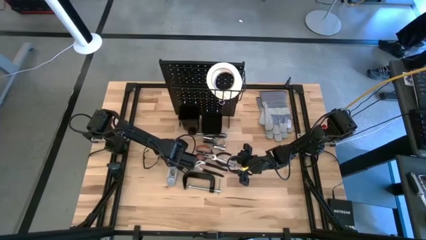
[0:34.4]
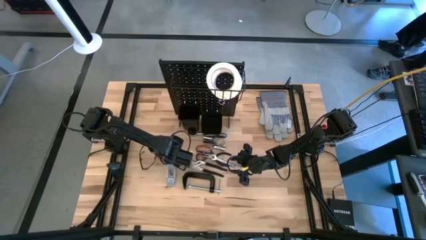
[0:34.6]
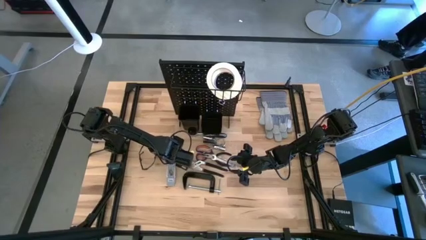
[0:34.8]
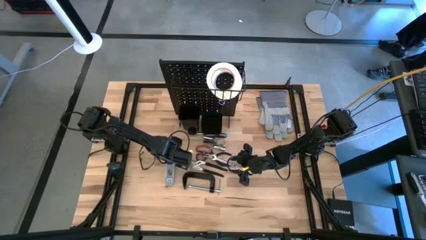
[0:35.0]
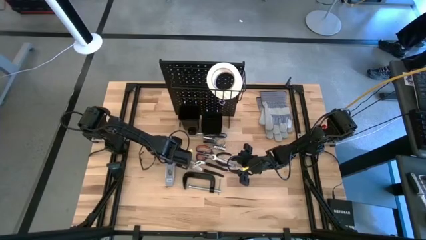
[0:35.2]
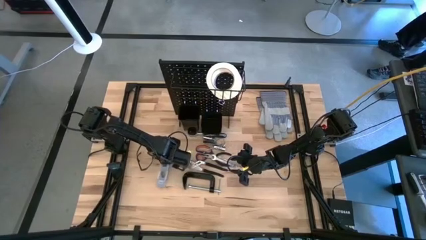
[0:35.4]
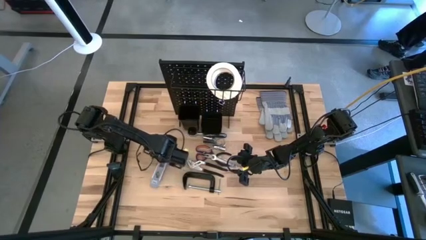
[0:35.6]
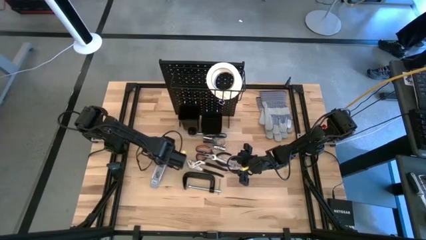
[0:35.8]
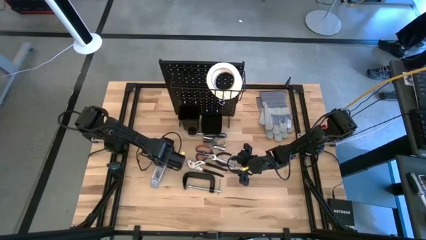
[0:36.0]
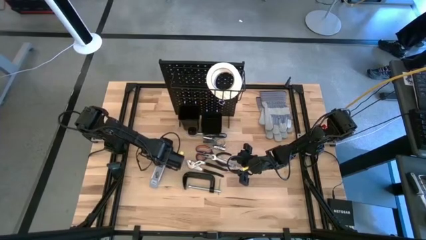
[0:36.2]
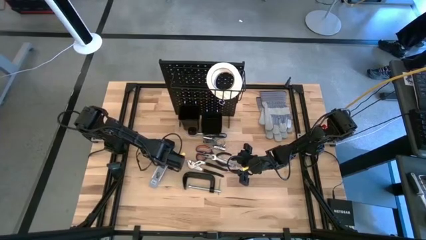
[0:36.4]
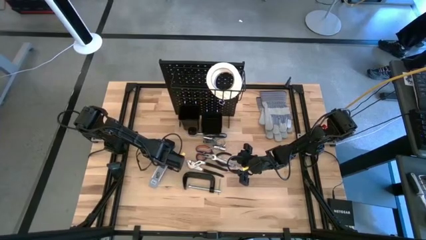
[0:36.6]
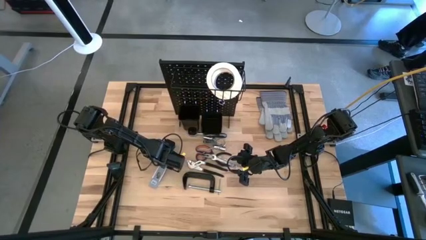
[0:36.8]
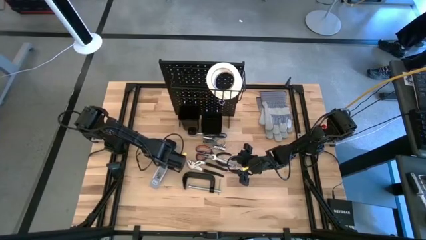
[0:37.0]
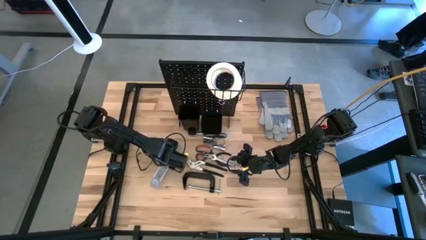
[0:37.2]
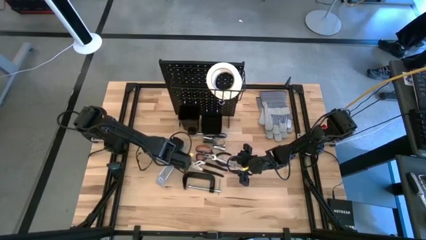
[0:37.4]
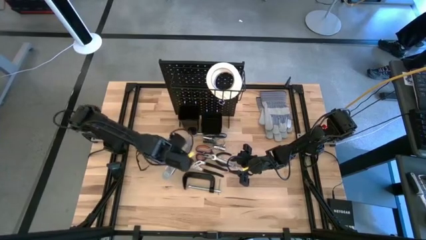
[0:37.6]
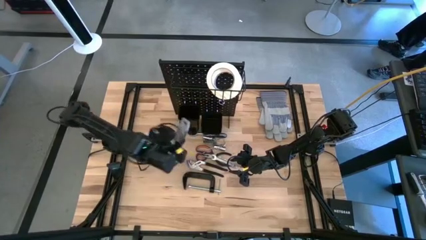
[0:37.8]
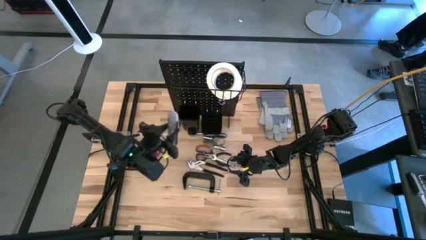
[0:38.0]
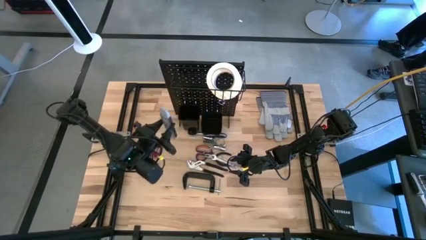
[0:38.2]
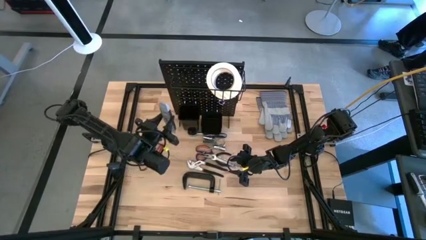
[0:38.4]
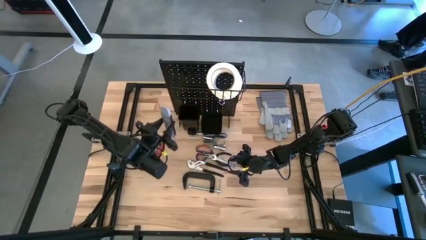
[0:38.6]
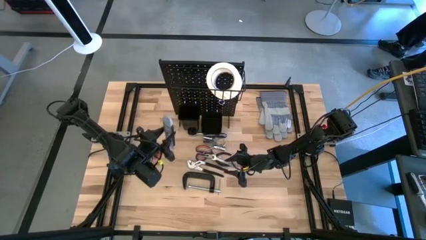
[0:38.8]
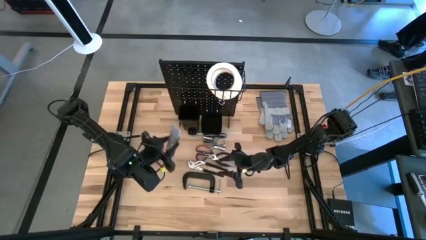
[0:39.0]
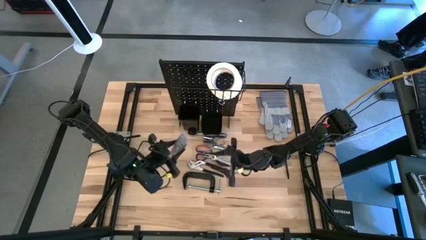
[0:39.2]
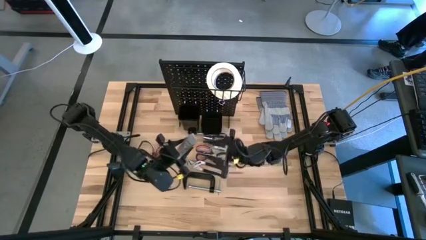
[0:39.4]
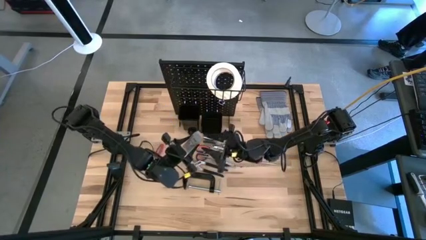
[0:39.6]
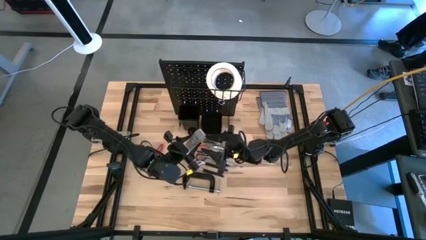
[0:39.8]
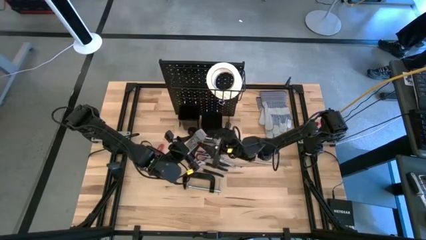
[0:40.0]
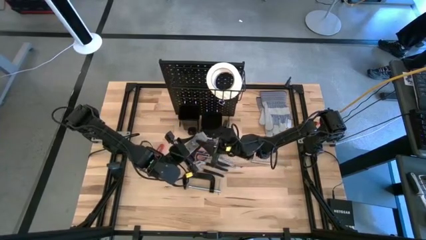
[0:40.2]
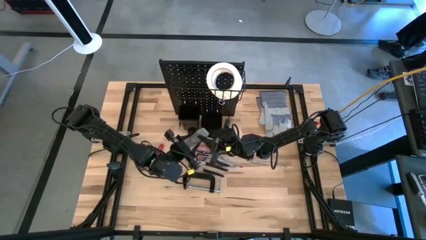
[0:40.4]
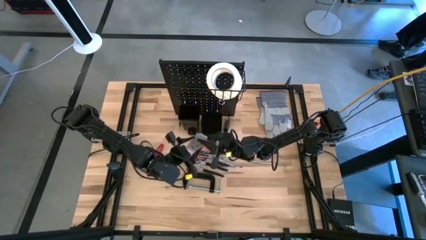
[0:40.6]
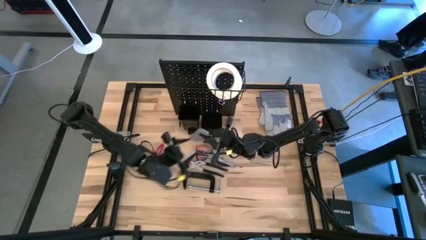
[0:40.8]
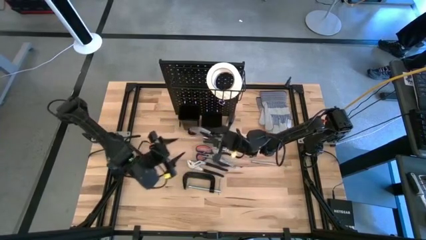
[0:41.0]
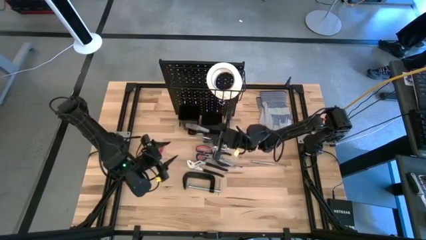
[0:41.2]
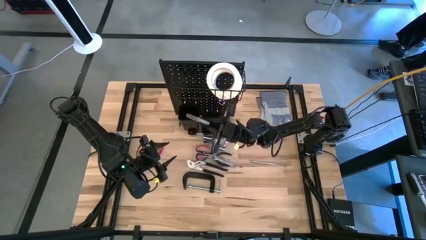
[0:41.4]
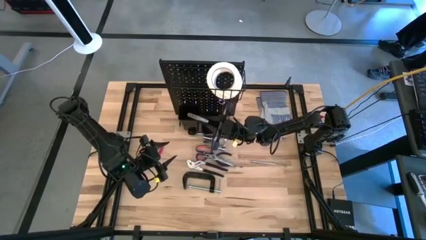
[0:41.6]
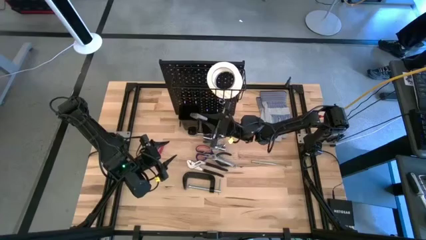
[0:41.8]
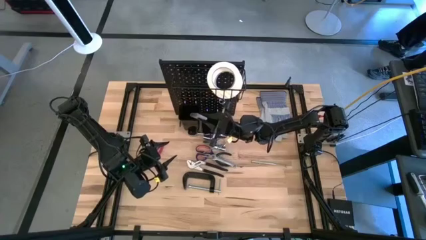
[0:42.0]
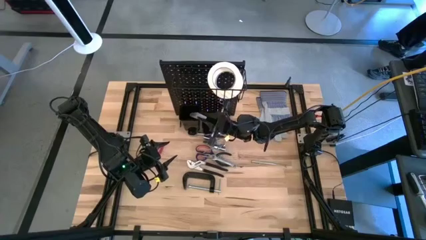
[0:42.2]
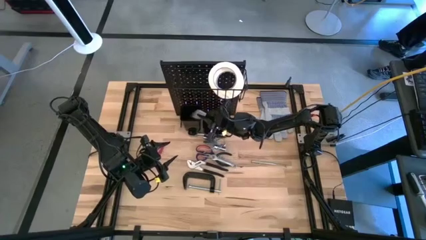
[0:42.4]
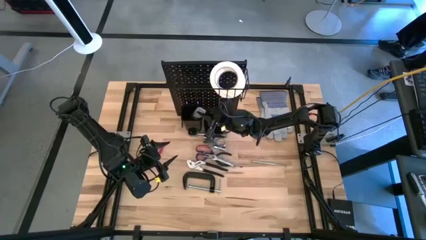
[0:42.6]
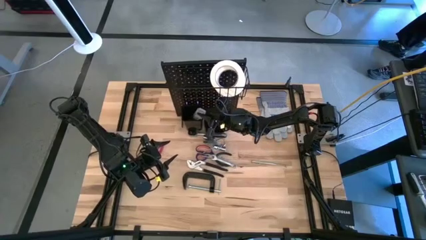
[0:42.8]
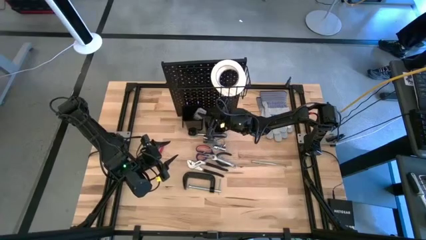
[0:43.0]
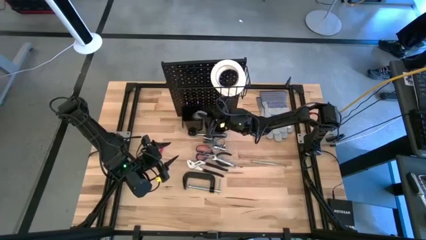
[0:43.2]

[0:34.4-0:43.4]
Task: Hang tools onto peg board
Put the spirit level into the left bin on the pegboard
